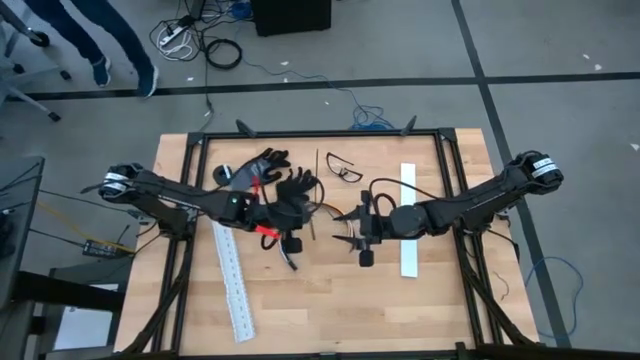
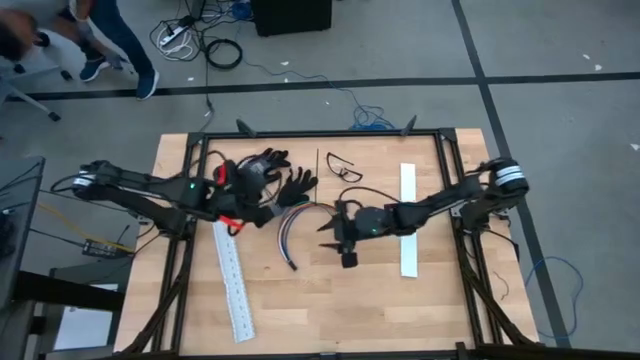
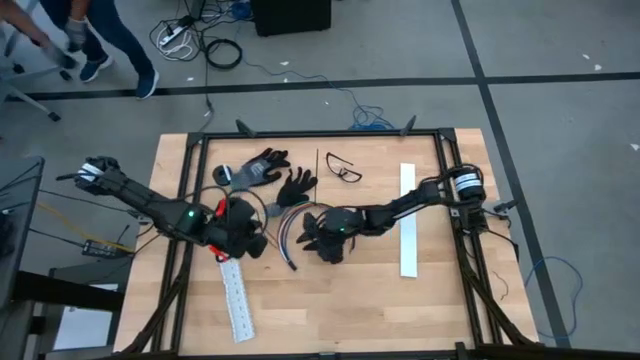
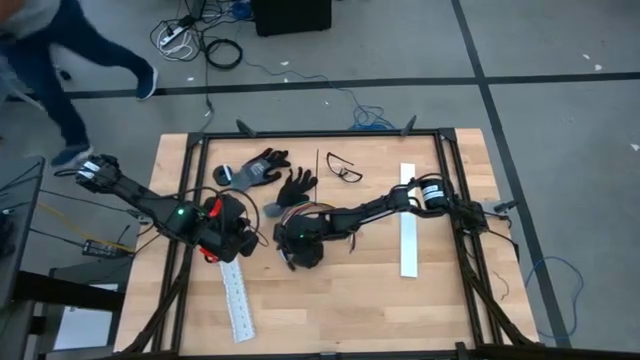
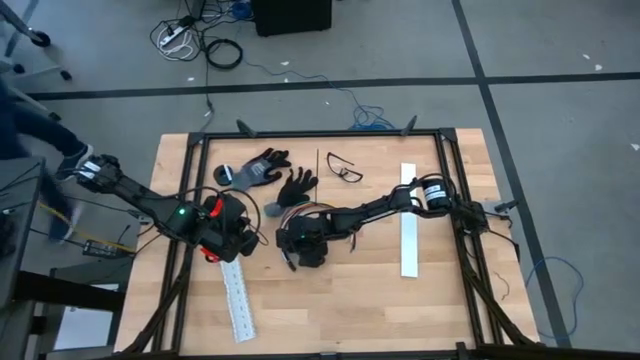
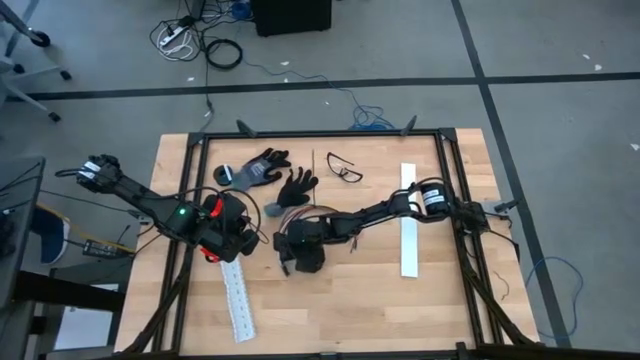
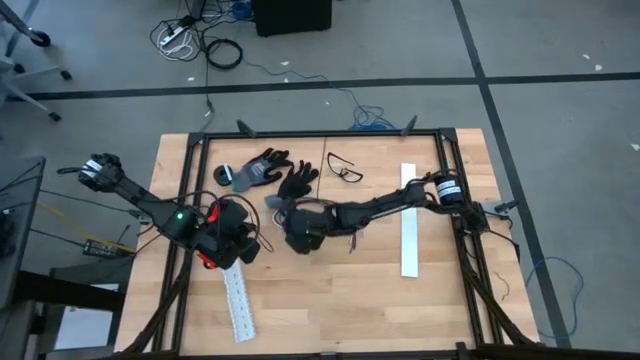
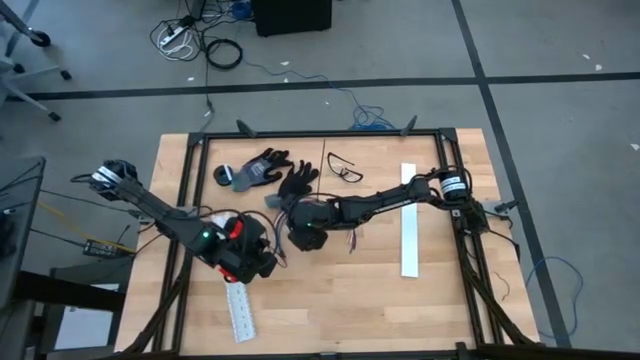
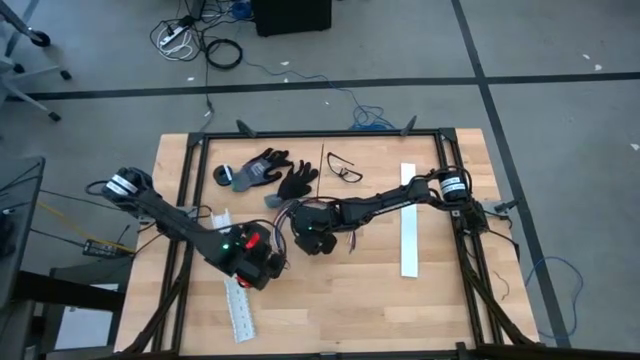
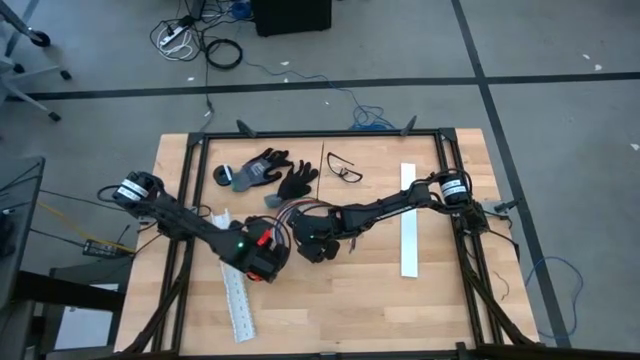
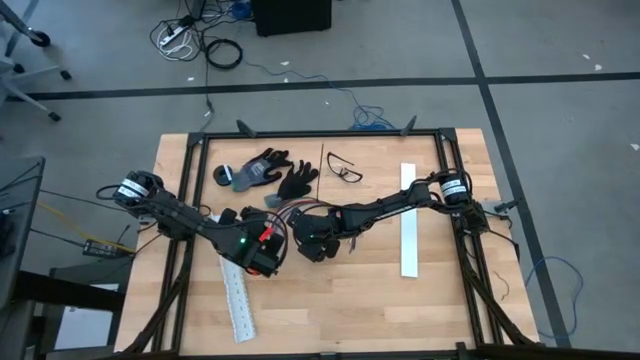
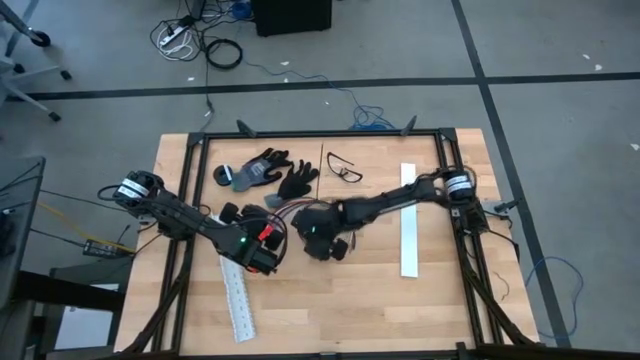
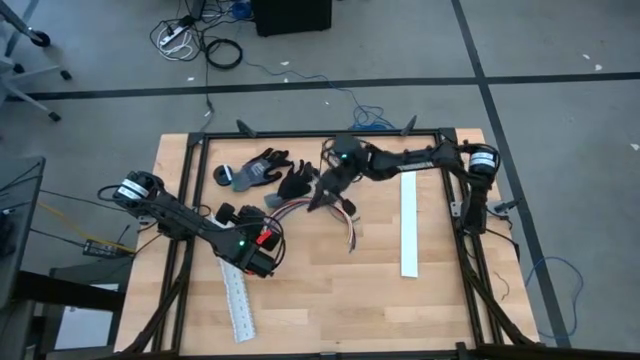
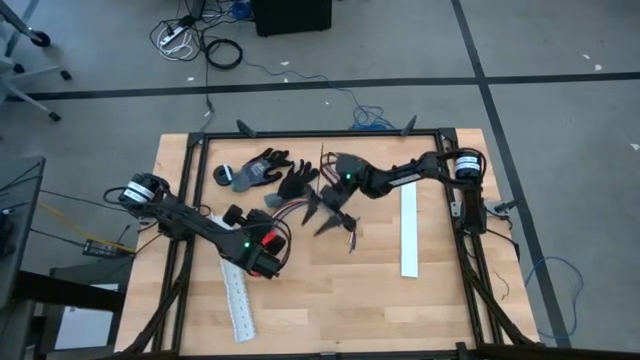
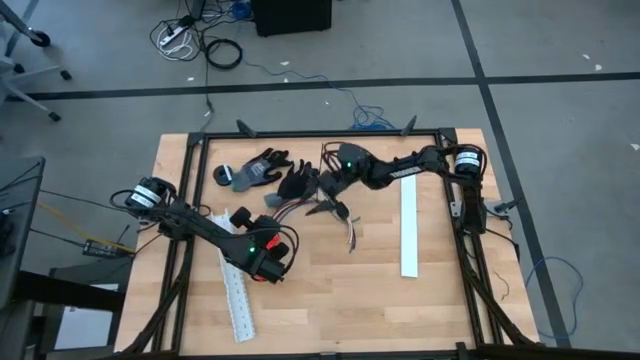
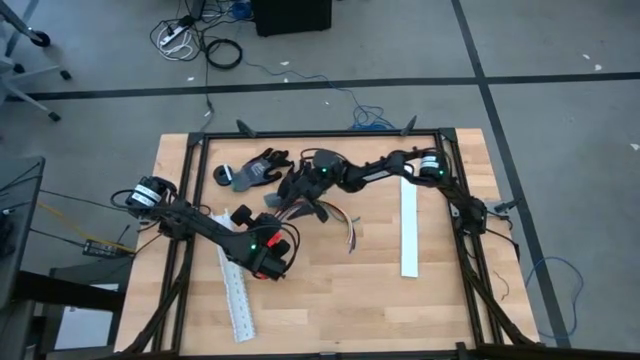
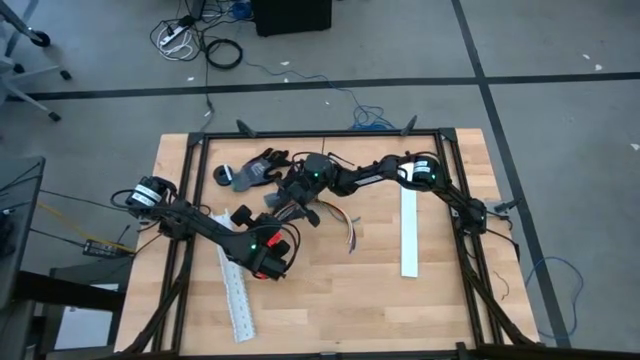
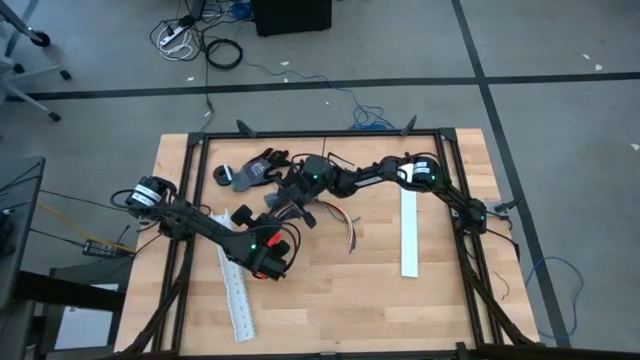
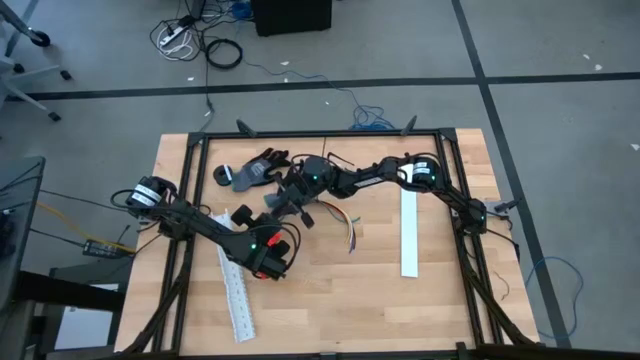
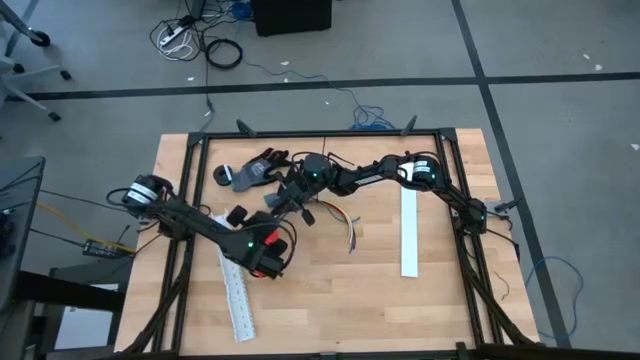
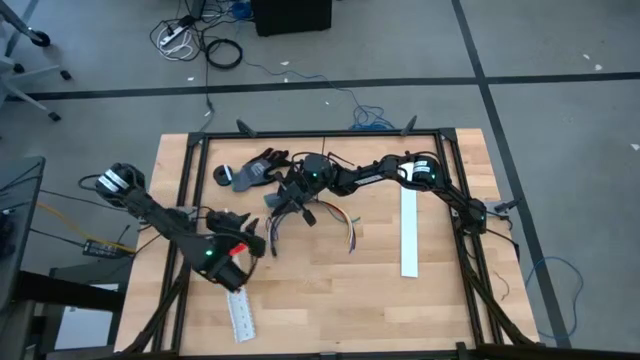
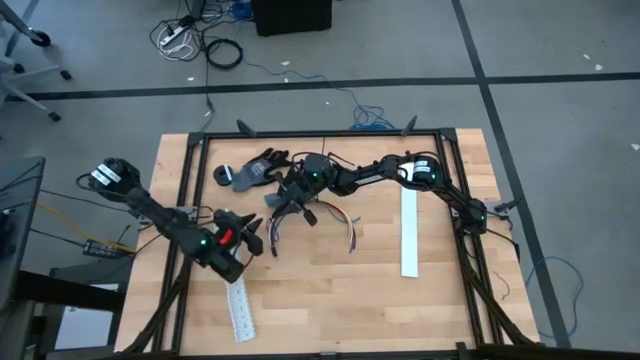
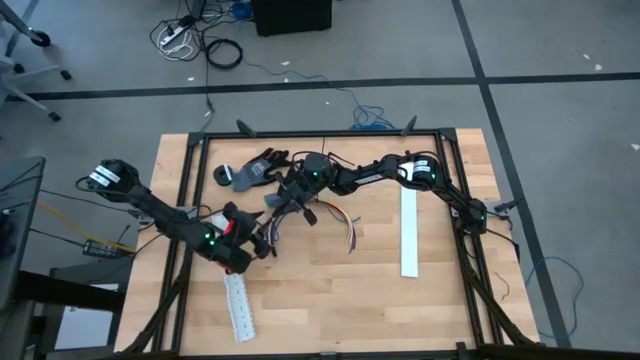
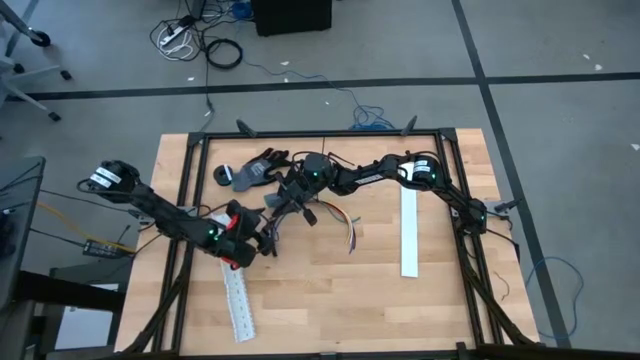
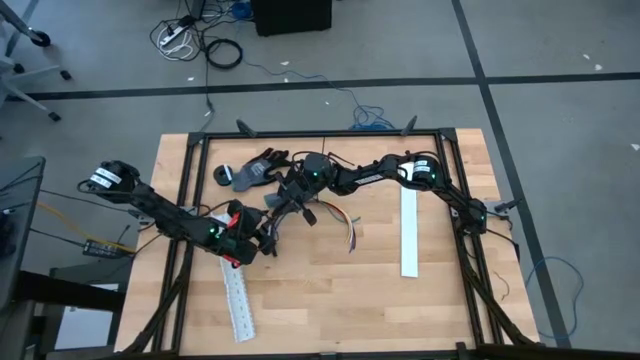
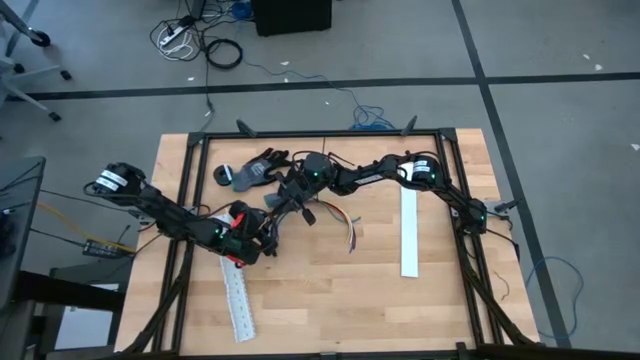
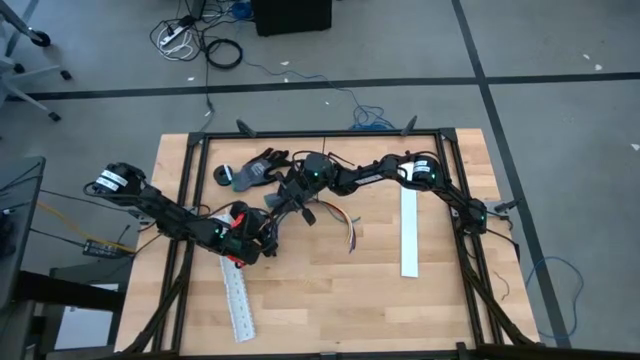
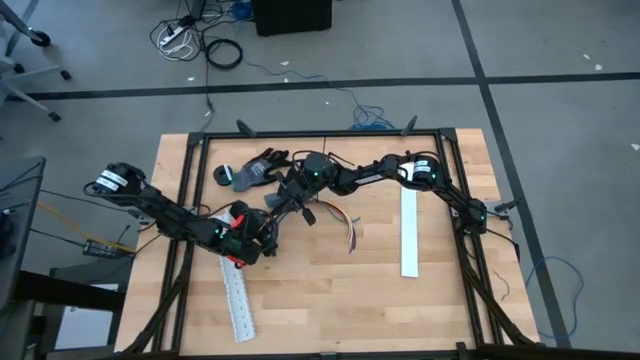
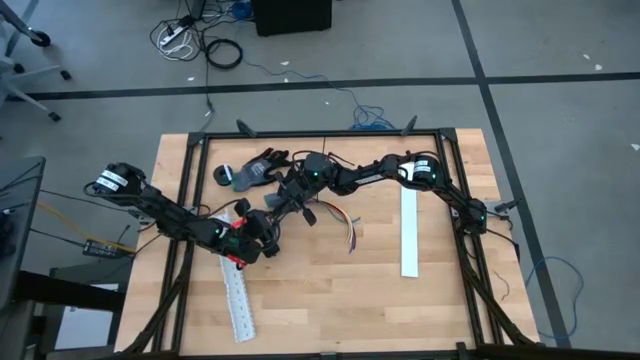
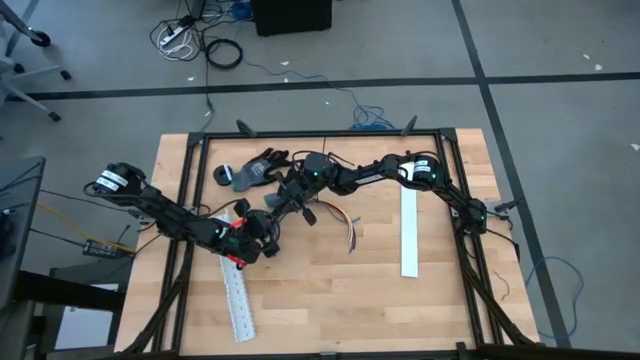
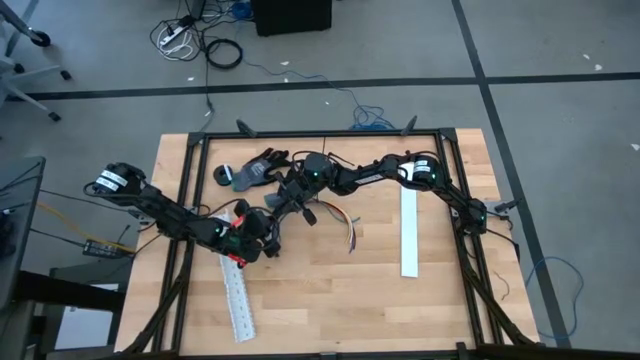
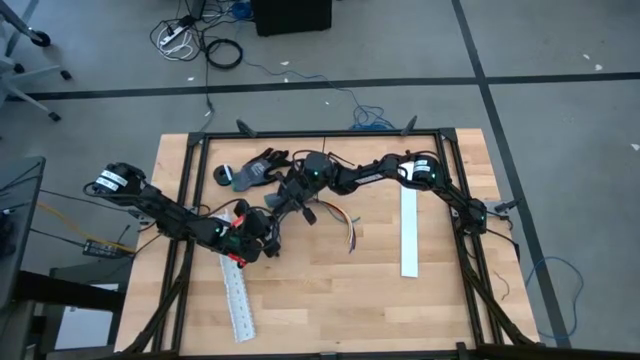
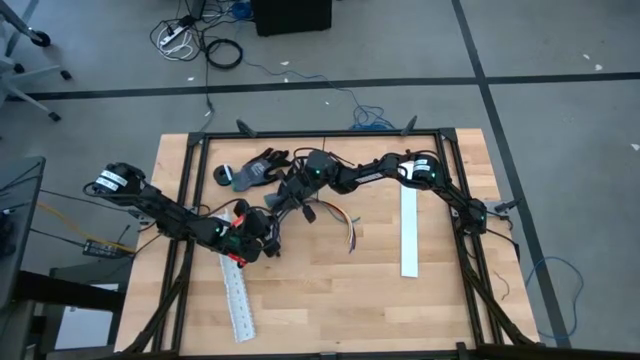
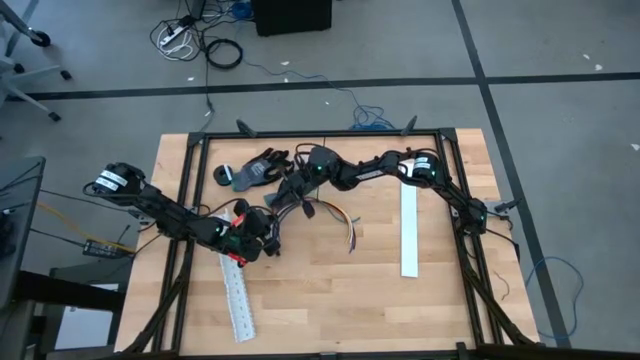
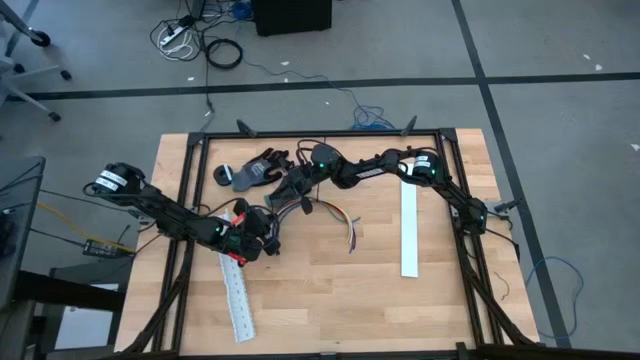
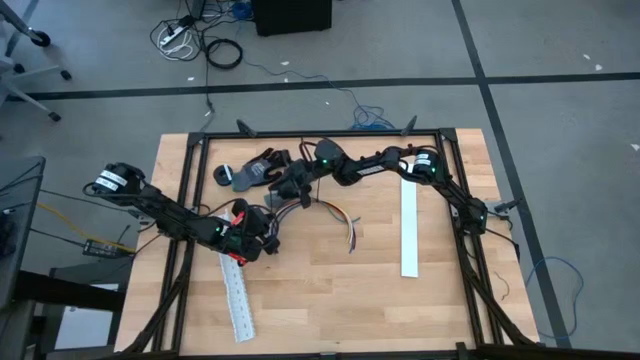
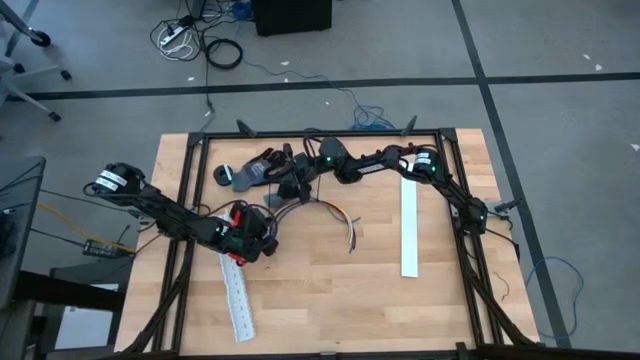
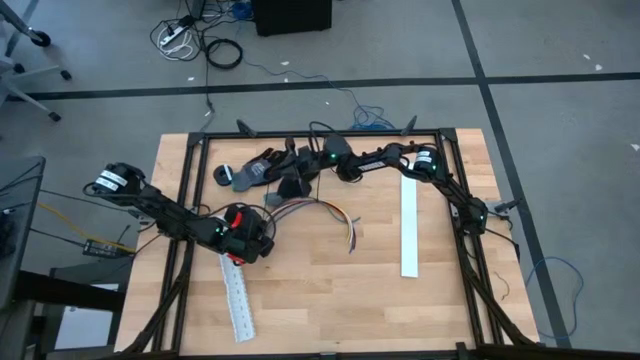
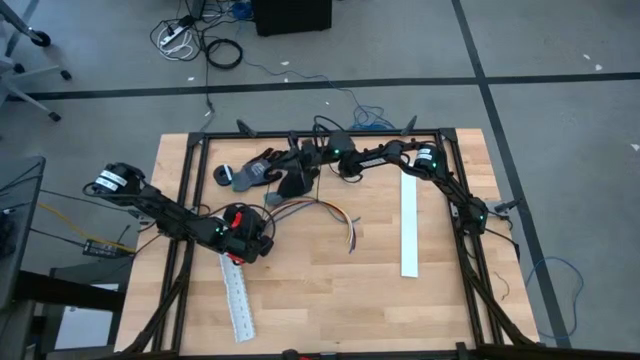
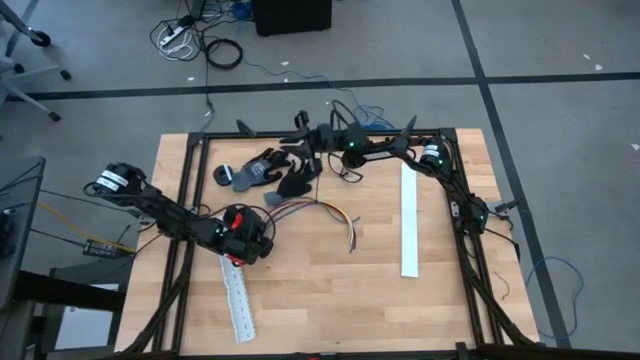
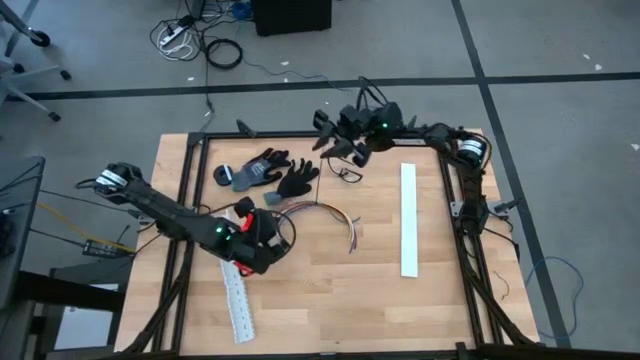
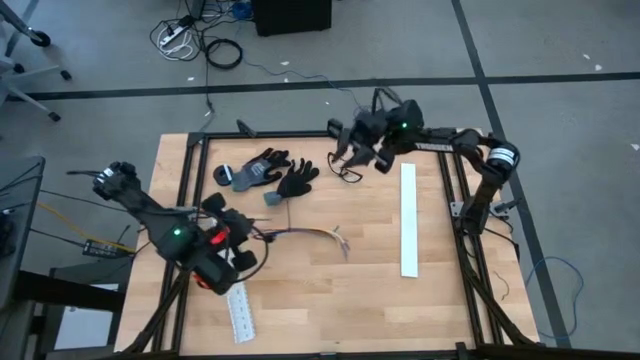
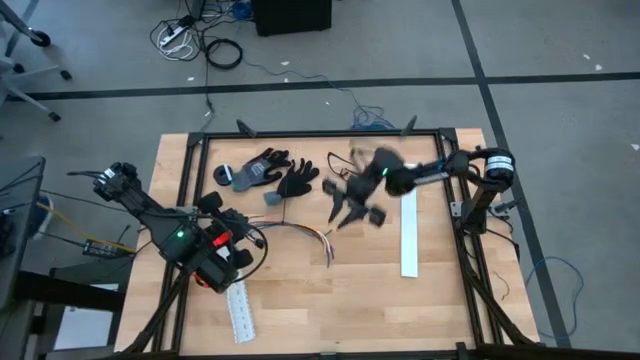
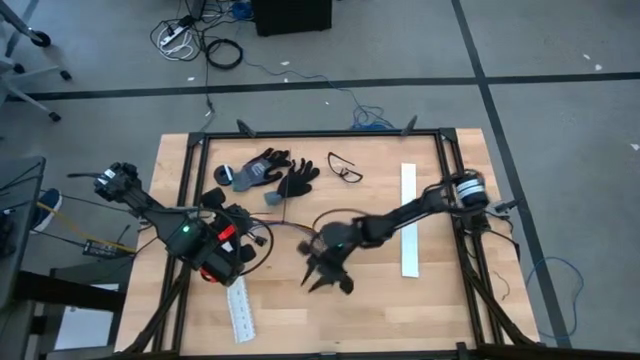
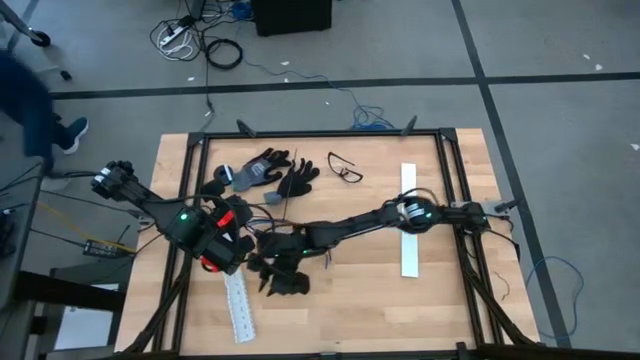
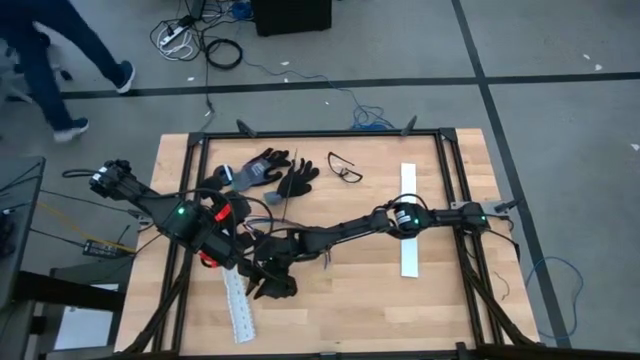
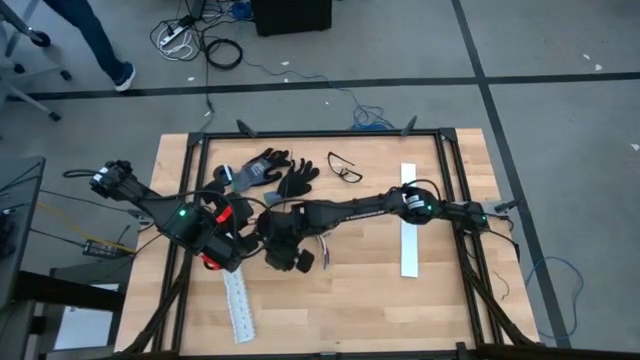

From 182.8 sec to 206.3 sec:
Task: Ziptie cables
Wrap the cables together using the black zip
